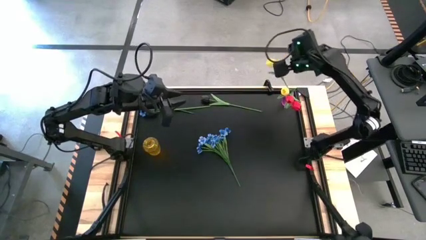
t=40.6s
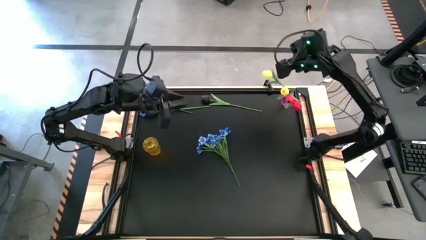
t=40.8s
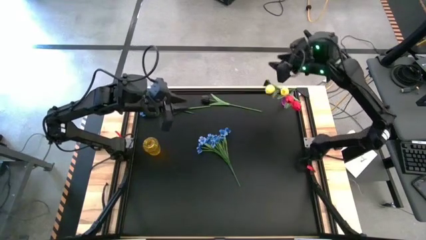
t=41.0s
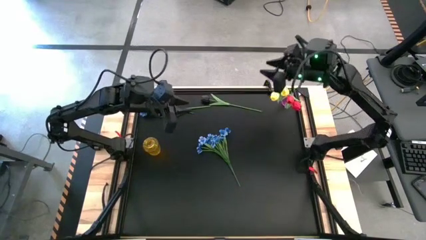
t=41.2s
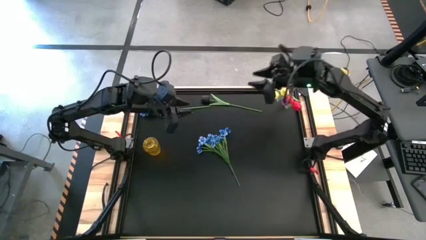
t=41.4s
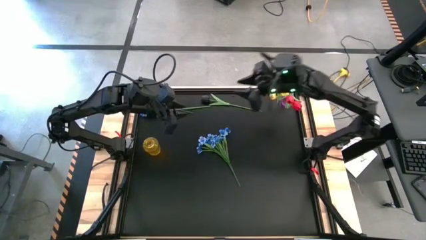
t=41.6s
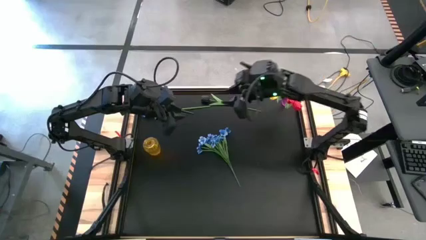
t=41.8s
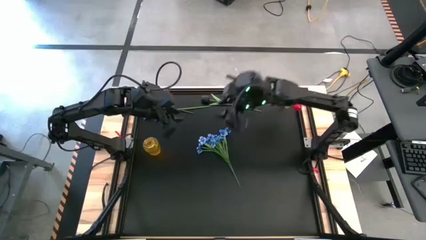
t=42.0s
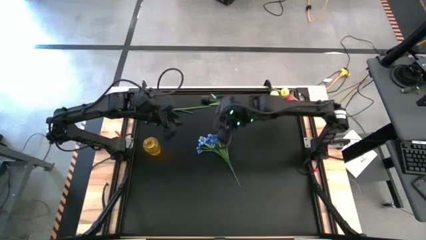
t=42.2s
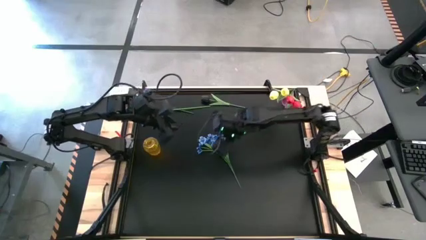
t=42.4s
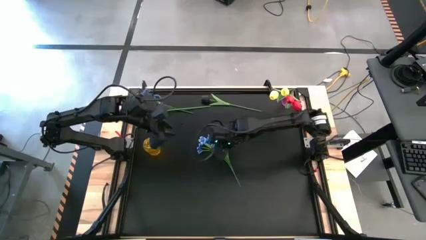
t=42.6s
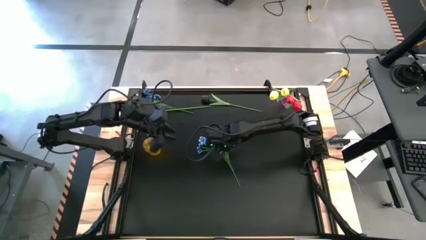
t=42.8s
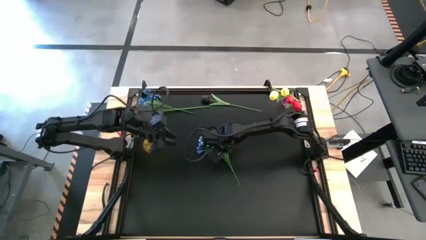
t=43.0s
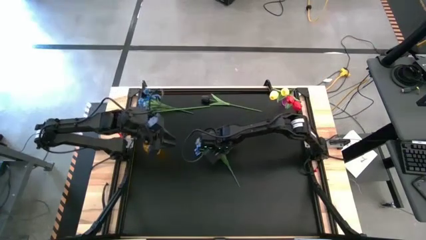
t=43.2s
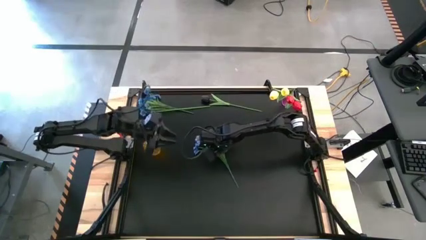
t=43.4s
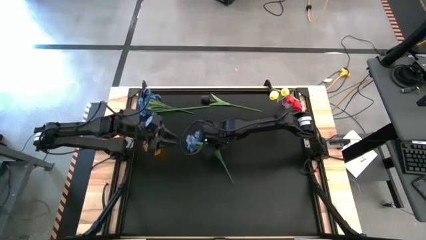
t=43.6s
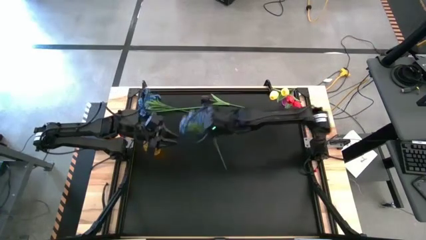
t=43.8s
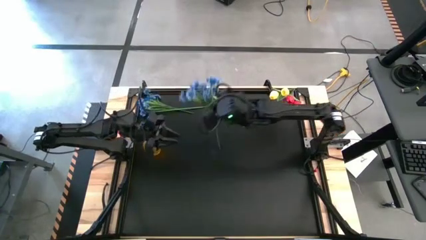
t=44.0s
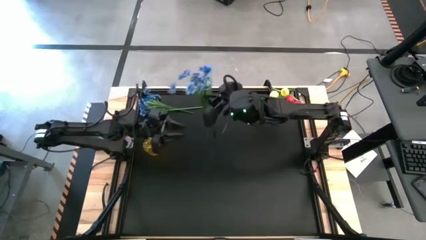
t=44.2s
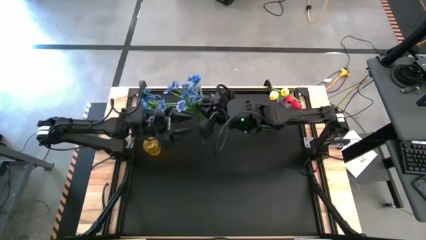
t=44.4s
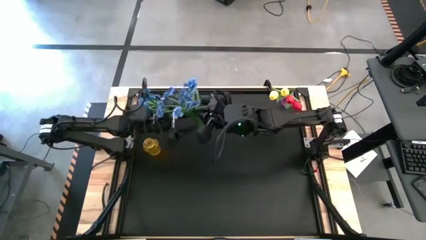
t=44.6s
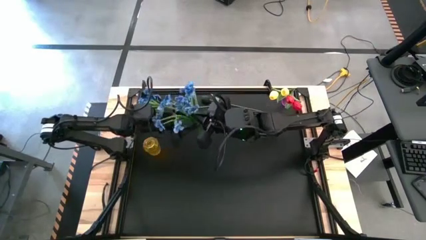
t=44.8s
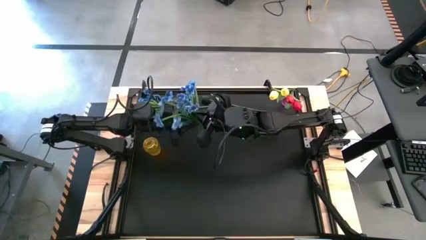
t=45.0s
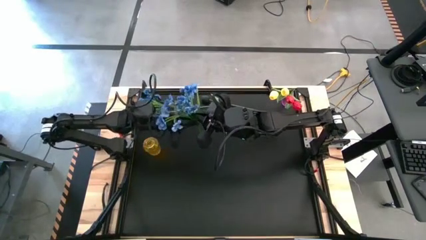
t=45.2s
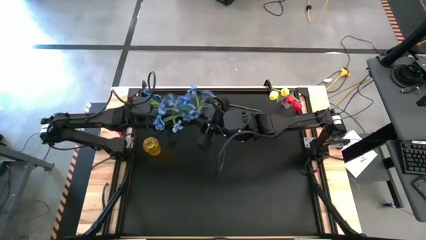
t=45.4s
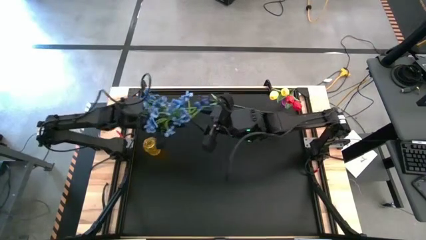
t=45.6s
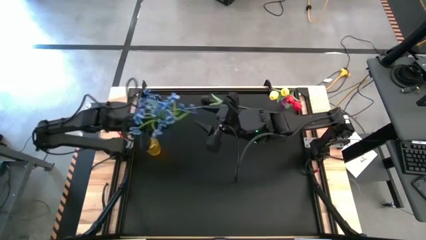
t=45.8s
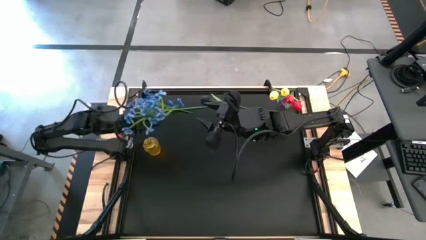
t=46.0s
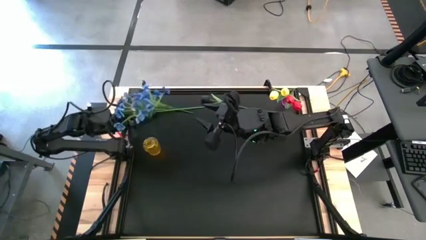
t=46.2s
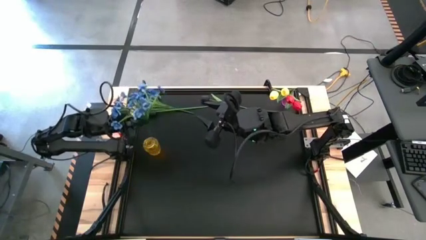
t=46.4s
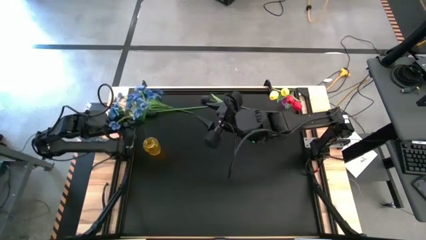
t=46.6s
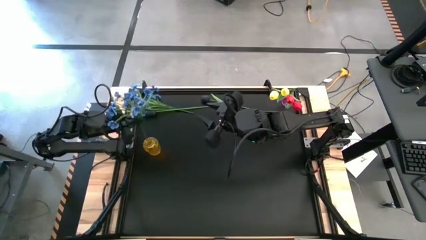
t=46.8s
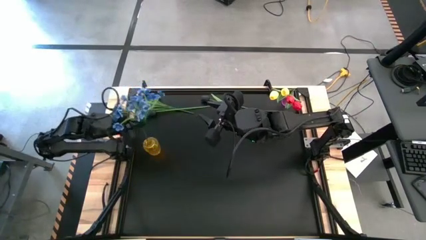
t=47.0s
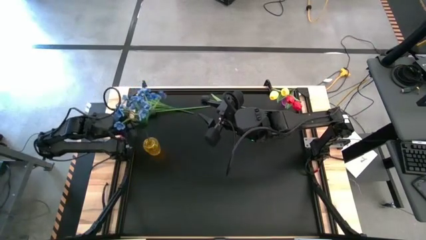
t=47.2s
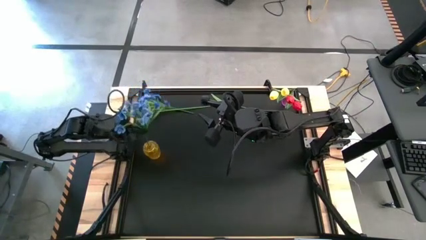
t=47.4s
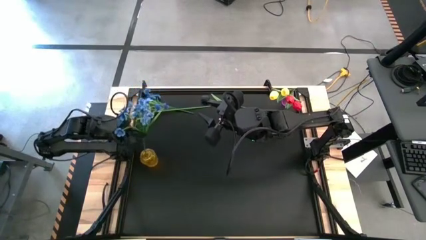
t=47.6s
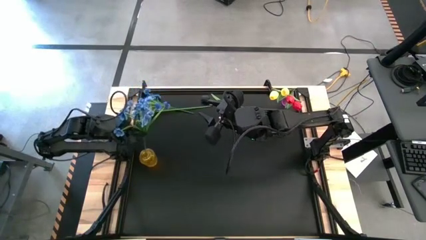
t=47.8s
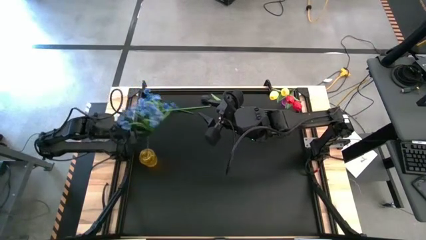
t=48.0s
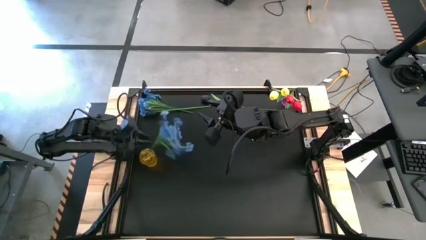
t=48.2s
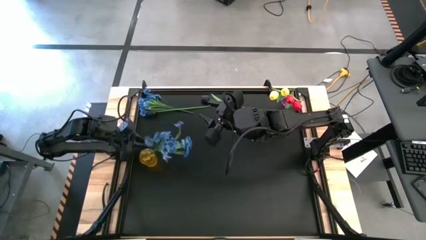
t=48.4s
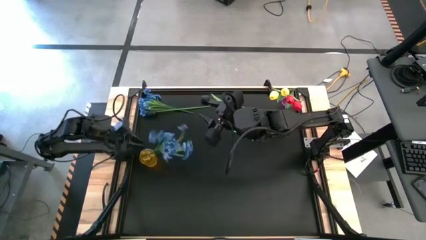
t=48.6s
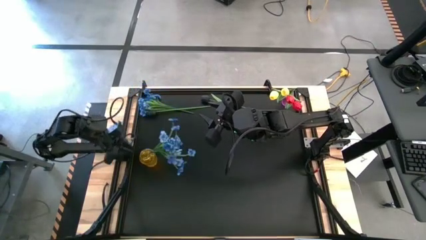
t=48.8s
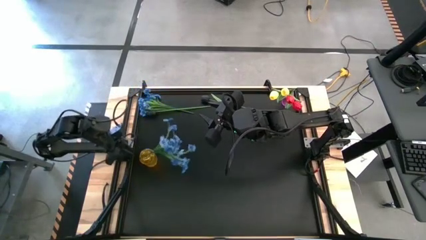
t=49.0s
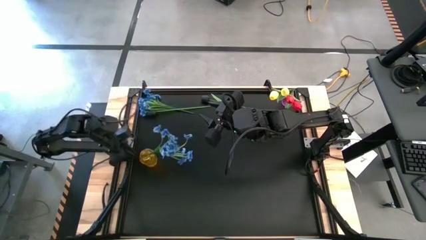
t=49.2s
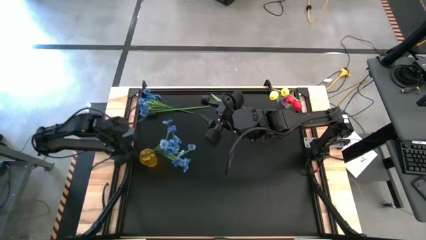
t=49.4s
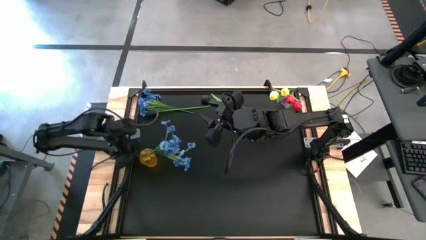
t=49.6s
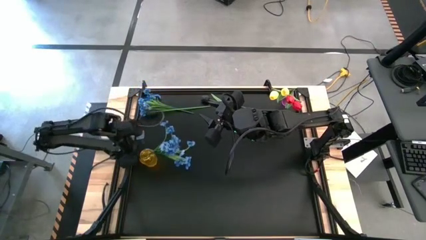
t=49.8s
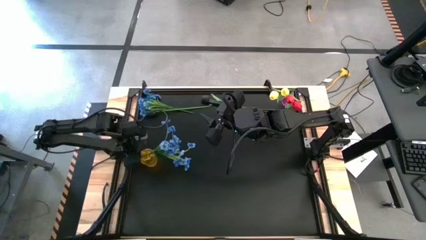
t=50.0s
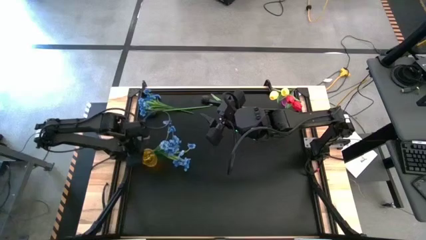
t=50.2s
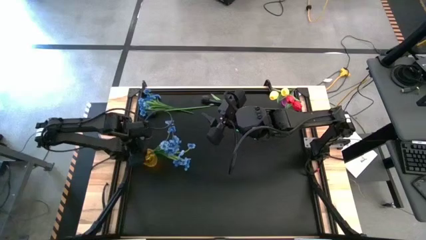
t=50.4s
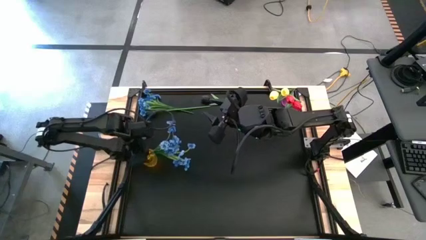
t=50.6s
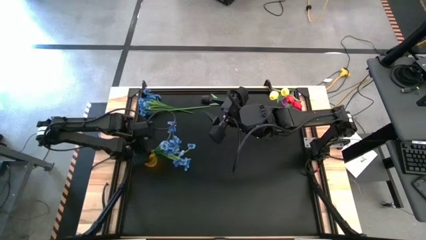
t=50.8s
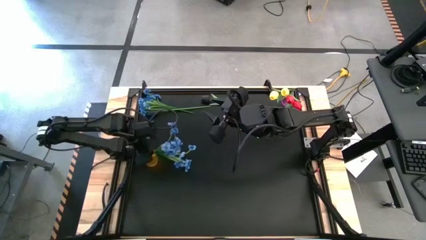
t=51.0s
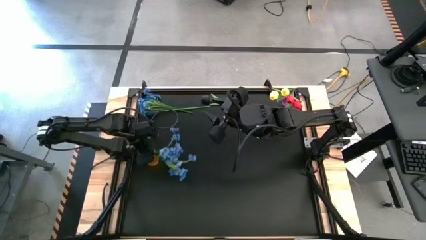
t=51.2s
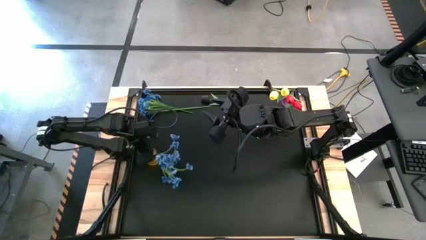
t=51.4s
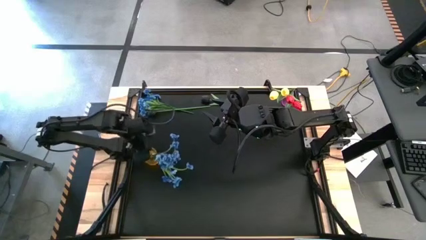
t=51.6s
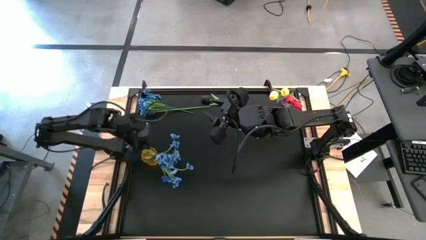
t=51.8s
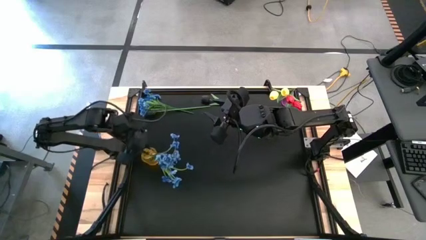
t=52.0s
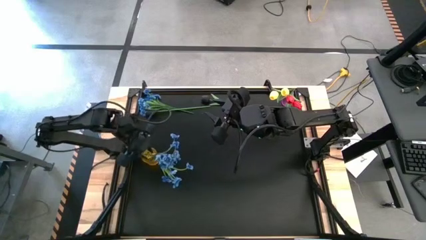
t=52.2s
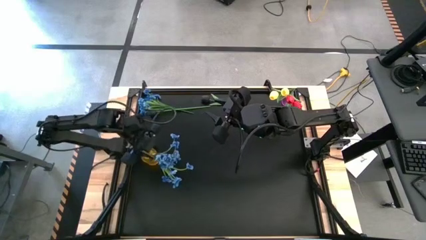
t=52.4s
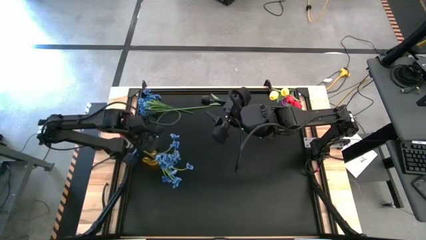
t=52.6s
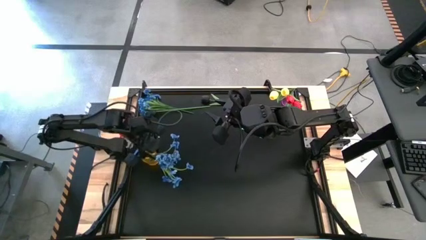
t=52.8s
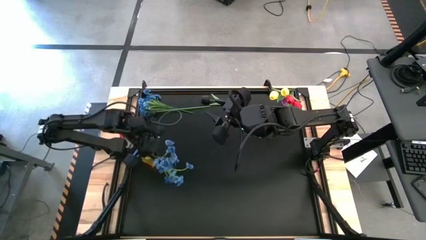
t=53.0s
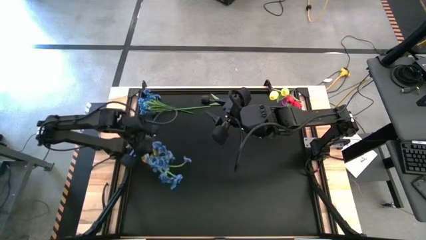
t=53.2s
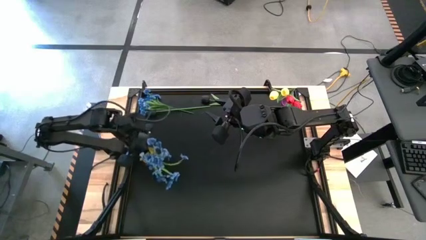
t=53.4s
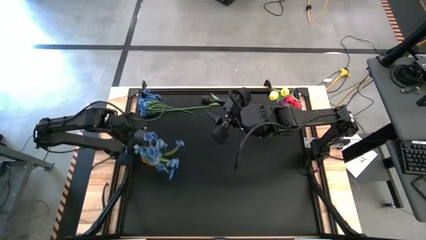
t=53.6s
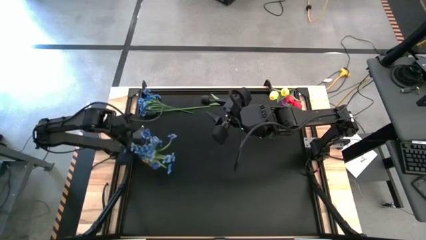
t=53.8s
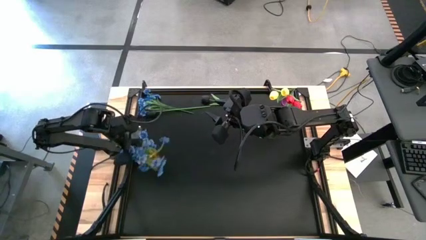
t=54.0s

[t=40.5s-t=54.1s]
Task: Sort flowers into vase by color
Put the bottom blue flowers into the yellow vase

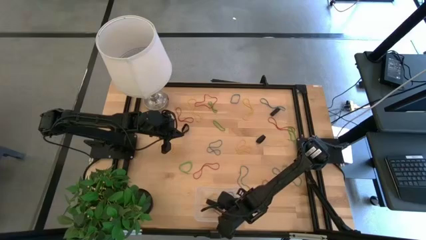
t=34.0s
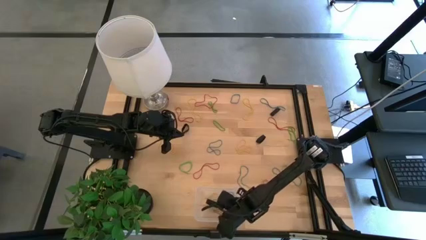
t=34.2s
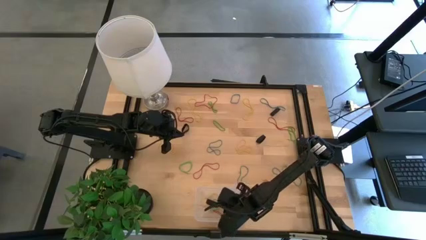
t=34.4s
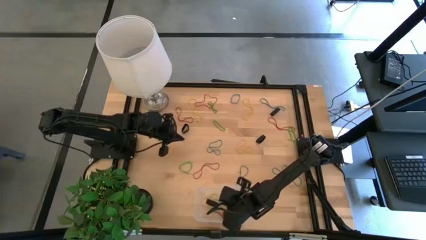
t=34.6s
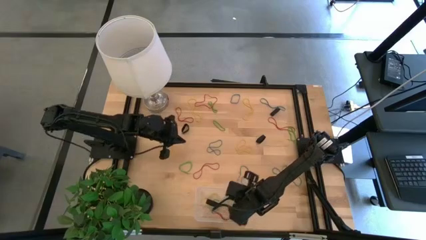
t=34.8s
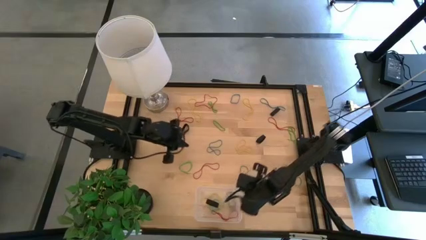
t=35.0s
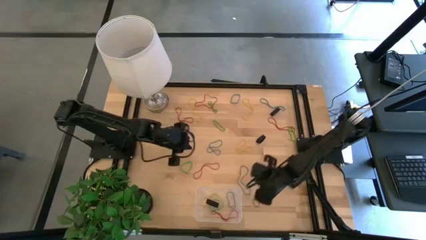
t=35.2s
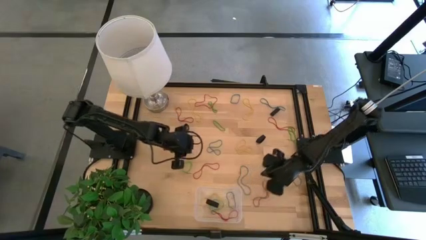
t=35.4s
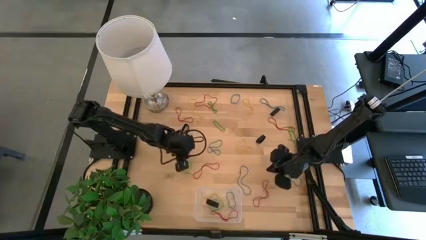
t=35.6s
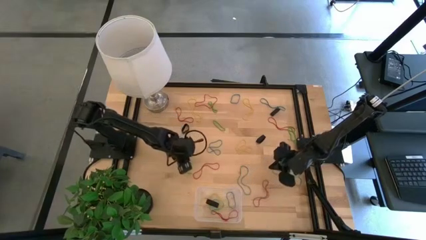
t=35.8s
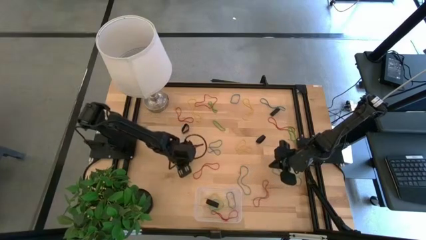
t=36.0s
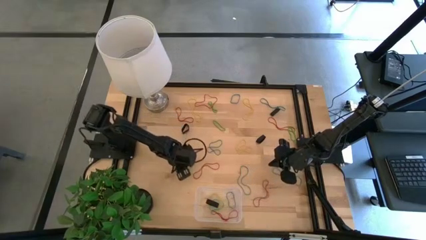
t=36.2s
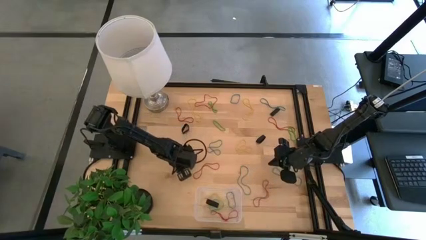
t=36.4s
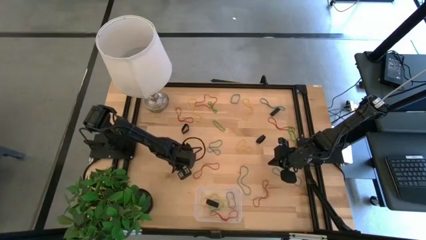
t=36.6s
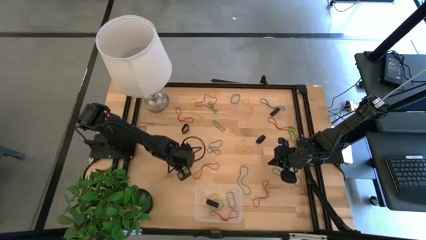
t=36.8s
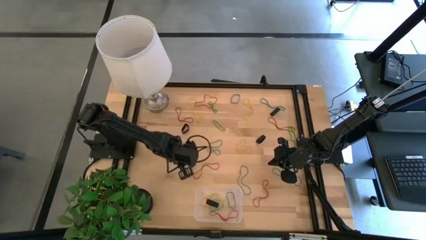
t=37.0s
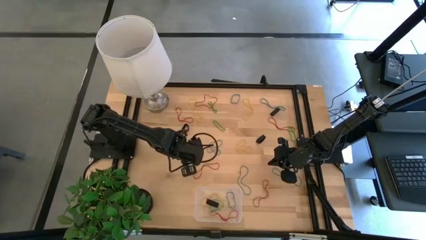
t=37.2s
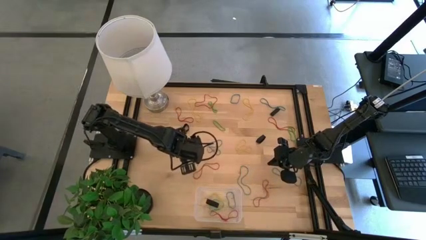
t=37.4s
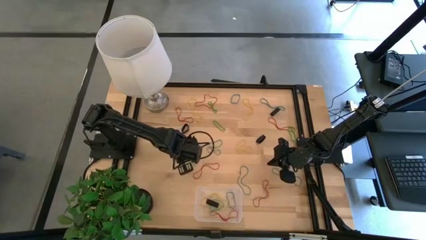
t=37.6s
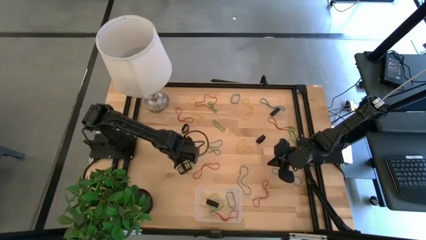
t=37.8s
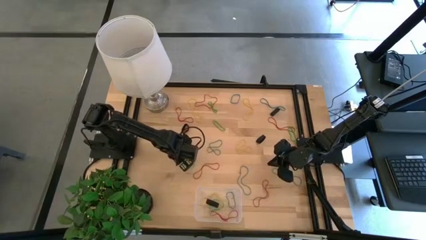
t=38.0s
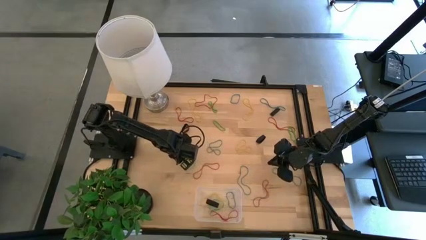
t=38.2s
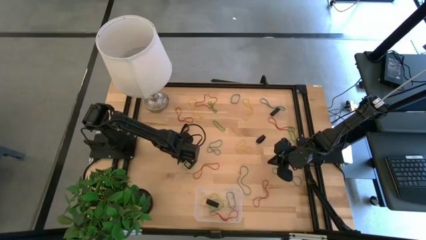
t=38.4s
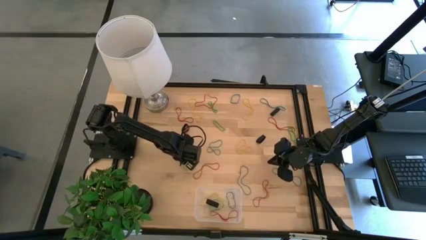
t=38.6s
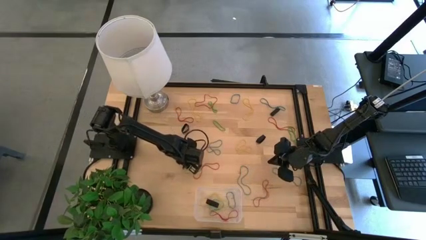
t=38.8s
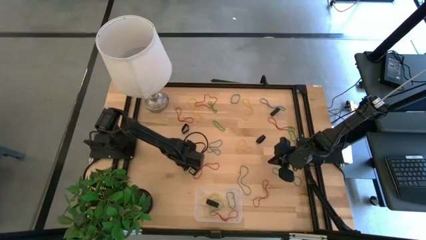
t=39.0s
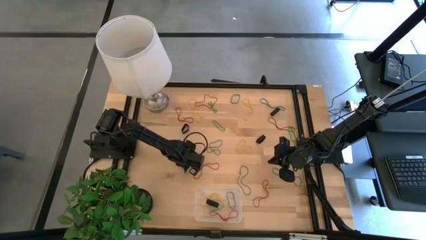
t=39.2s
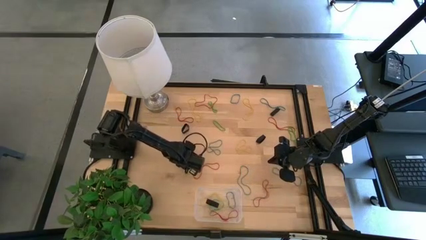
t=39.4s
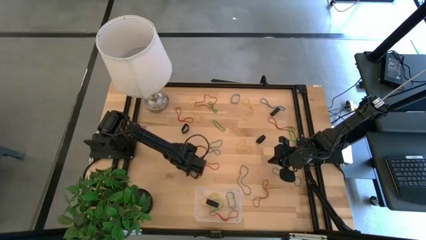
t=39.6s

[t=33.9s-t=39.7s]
Task: Pick and place rubber bands into bin
Put the green rubber band into the transparent bin
